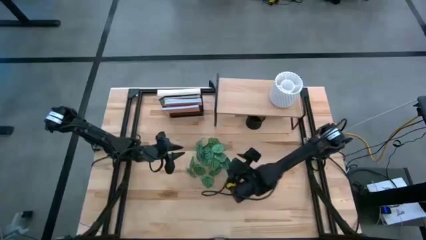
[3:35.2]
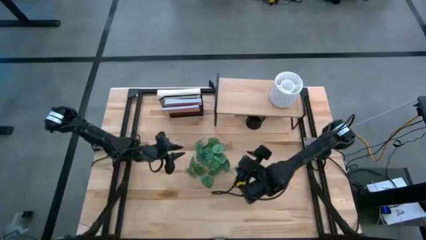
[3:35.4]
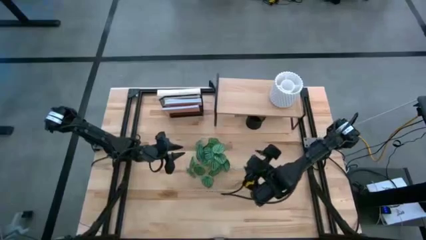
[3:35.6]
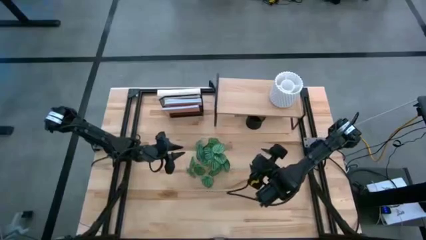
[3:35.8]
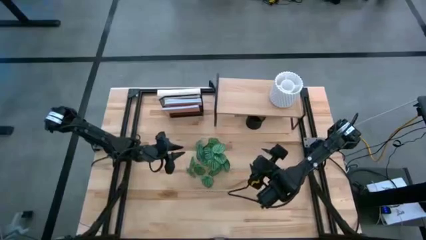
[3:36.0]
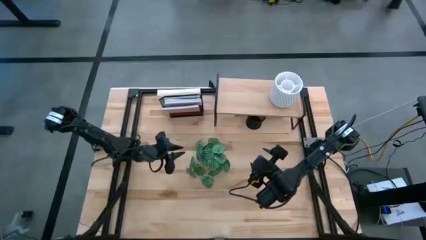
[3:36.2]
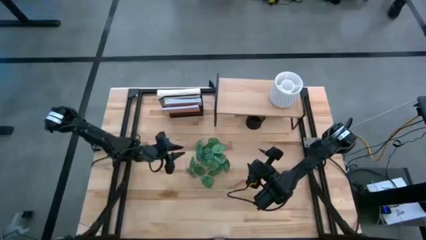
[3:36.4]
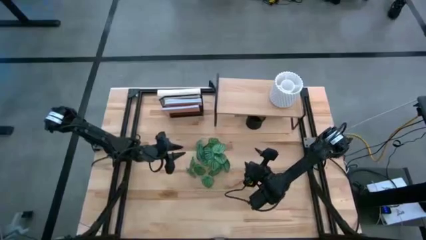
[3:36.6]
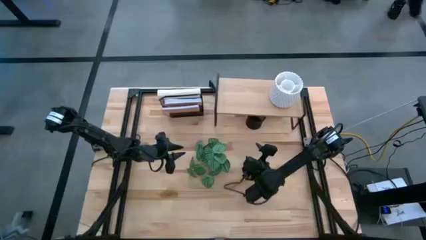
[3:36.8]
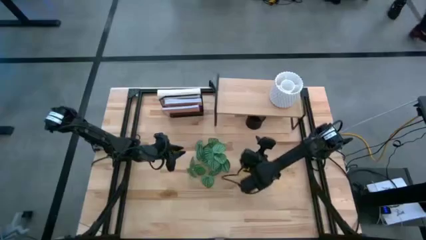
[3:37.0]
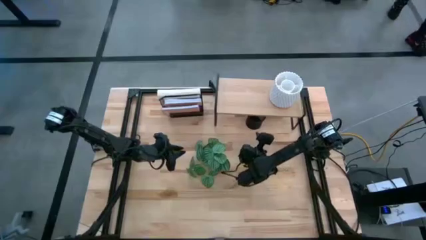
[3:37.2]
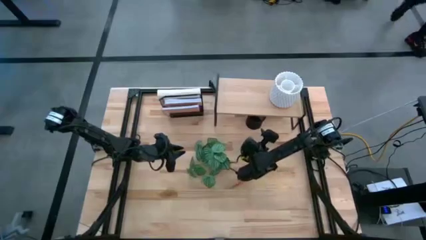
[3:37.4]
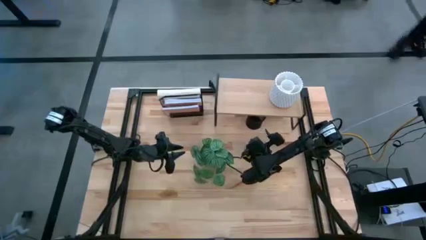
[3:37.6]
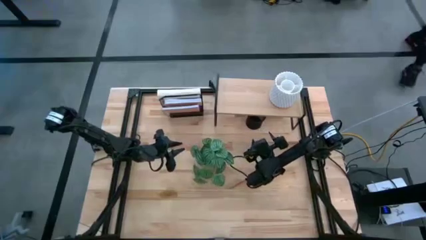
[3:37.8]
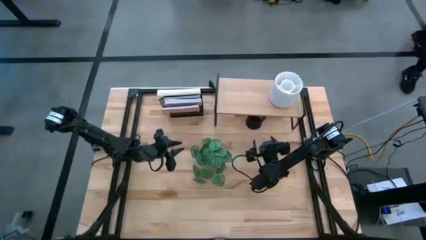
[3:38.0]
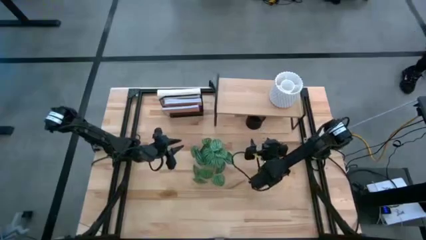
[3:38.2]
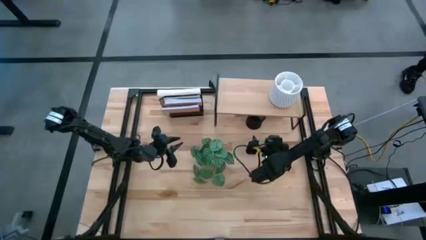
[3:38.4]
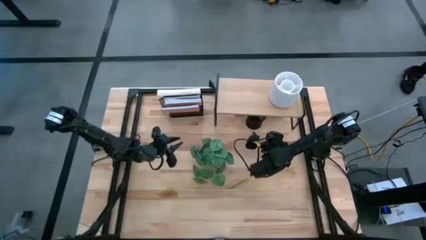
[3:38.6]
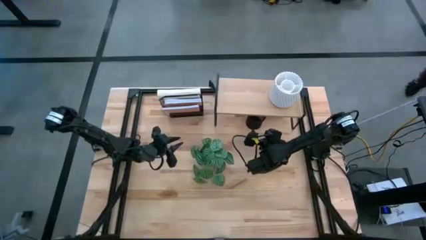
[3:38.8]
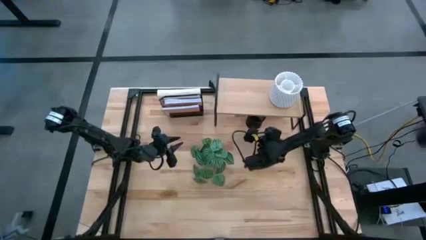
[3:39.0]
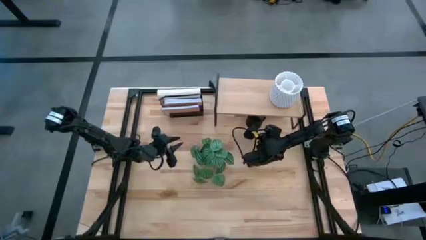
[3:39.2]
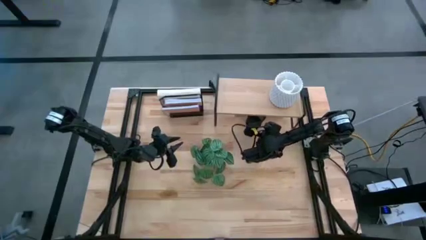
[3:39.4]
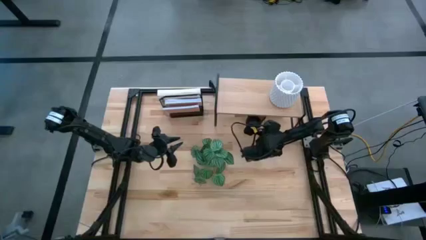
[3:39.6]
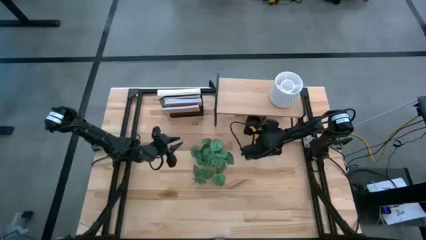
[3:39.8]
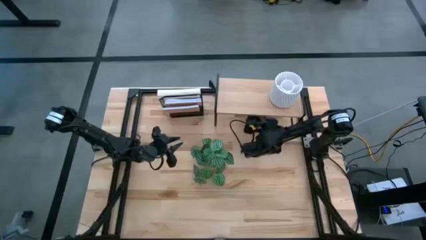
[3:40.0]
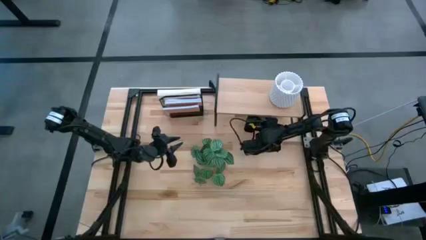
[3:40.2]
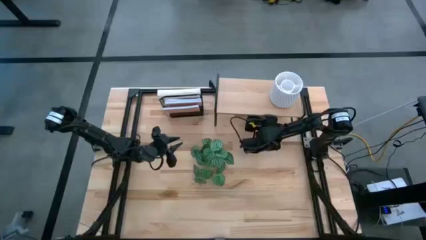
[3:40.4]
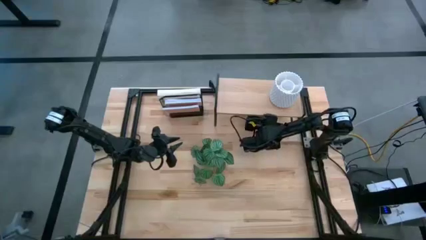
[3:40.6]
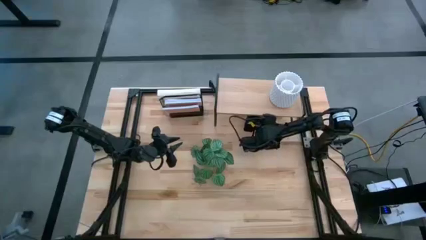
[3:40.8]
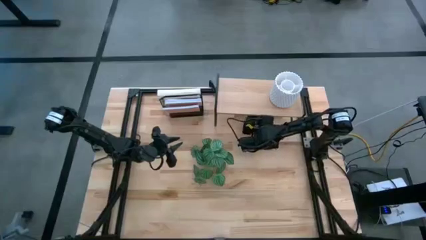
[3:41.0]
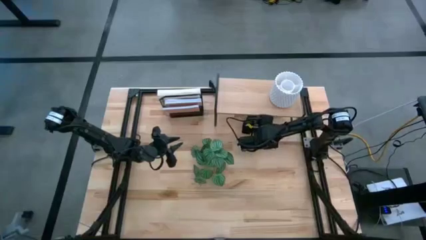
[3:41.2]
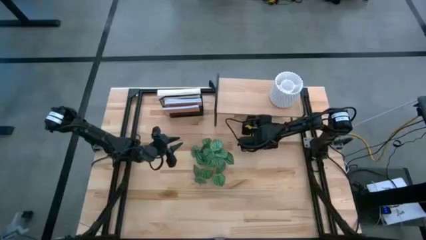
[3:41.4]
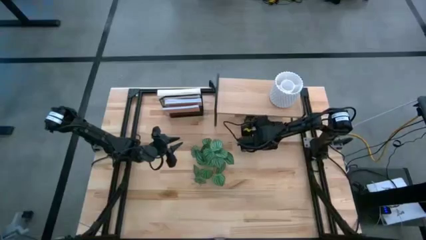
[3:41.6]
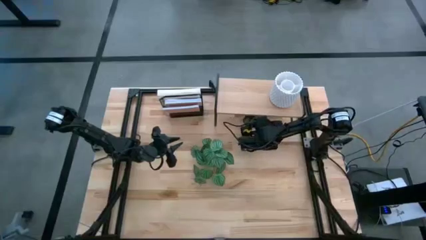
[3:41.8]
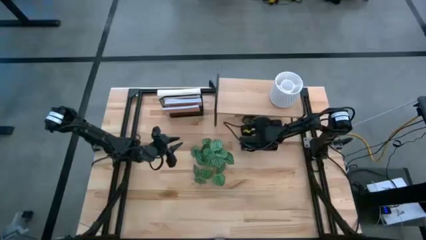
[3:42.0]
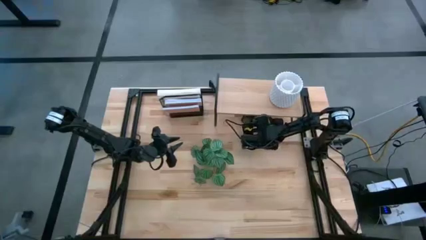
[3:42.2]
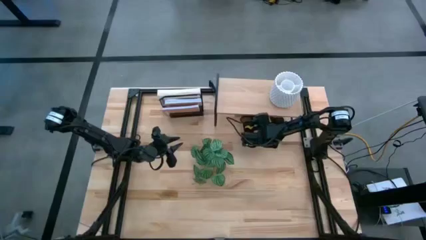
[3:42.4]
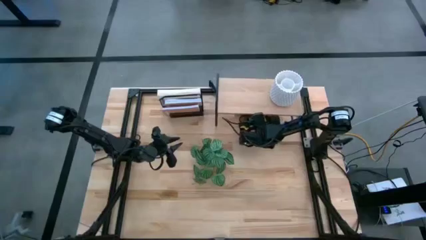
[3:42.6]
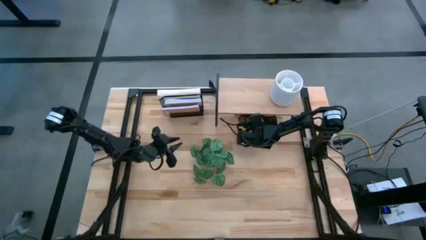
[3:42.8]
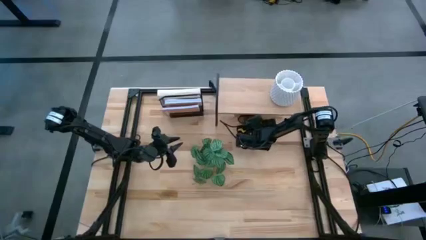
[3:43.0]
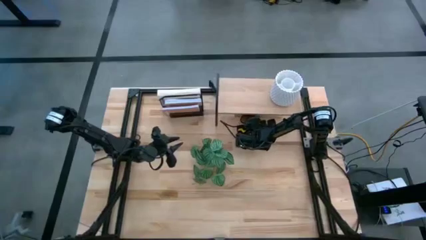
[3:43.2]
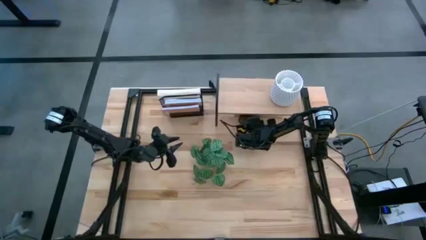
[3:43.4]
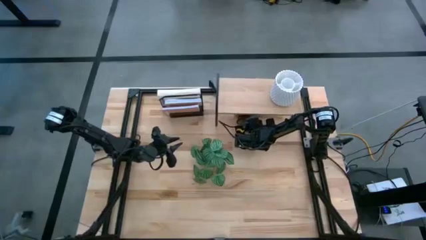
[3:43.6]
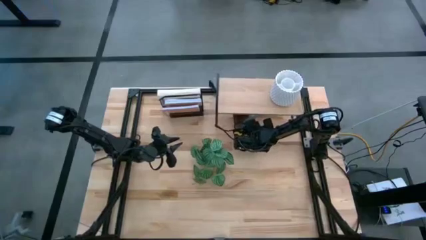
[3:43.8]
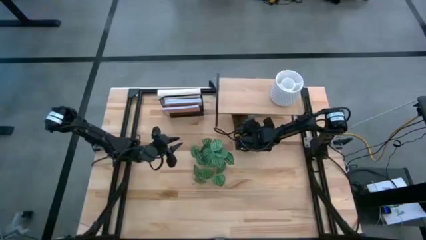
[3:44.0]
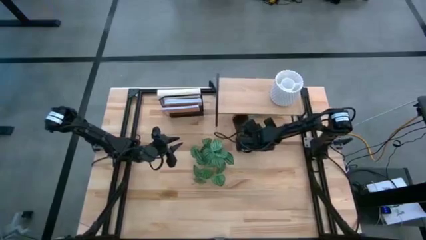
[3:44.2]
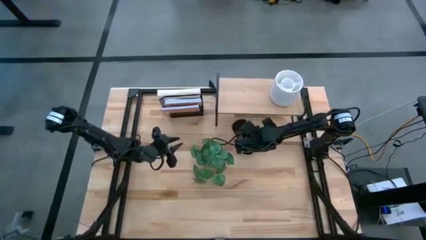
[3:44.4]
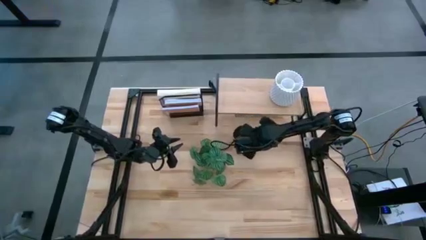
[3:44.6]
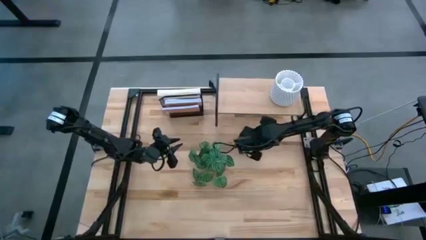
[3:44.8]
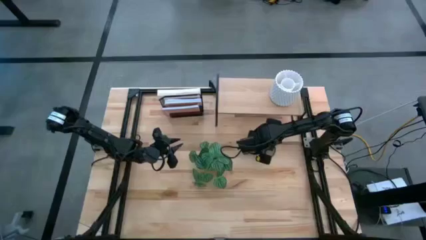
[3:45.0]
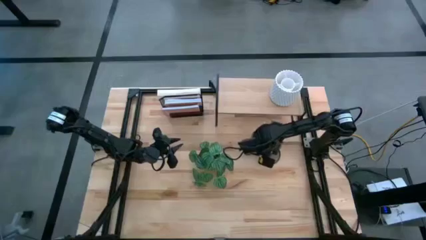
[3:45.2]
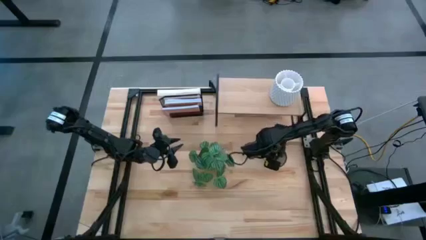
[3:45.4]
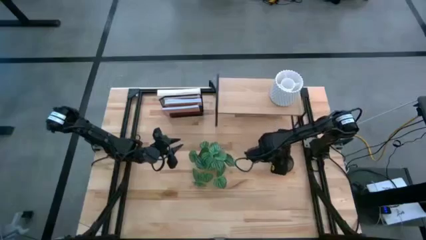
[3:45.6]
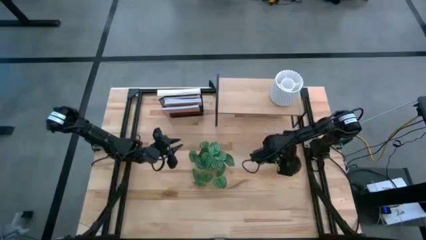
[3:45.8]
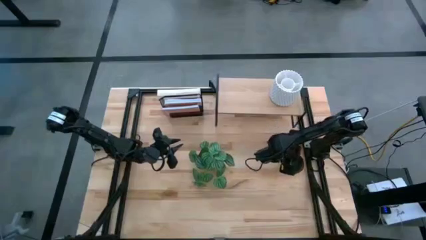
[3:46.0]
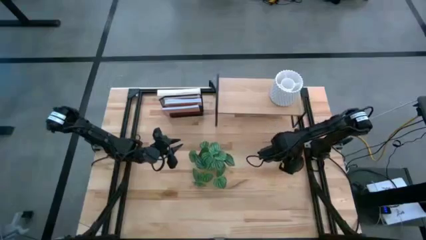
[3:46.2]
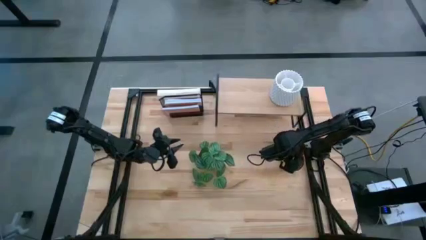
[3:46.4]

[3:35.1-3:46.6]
Task: Stock shelves
Remove the black pen organizer from the shelf
